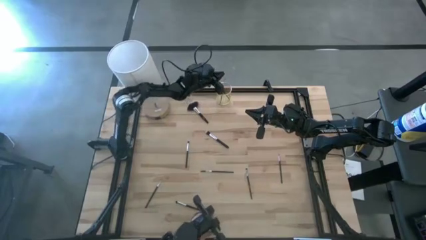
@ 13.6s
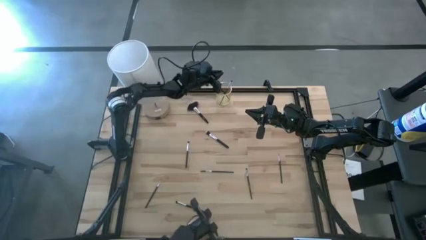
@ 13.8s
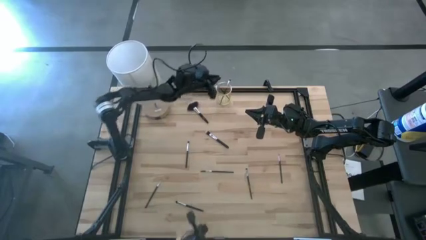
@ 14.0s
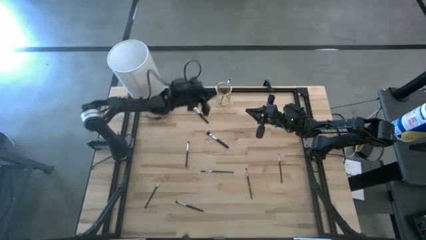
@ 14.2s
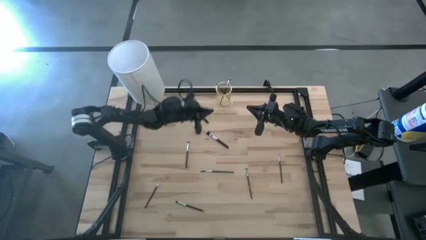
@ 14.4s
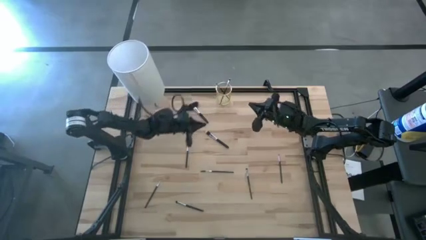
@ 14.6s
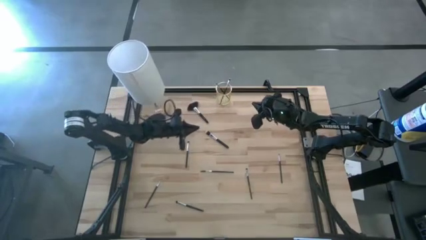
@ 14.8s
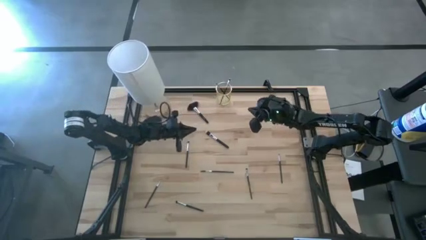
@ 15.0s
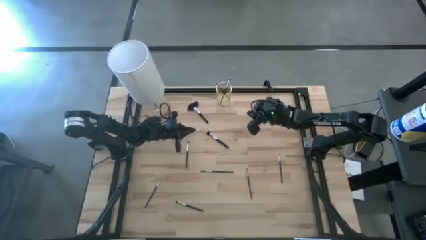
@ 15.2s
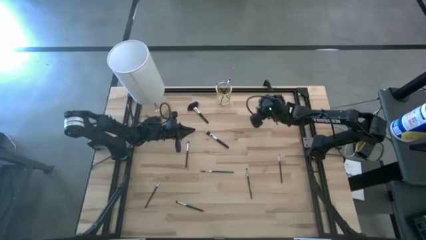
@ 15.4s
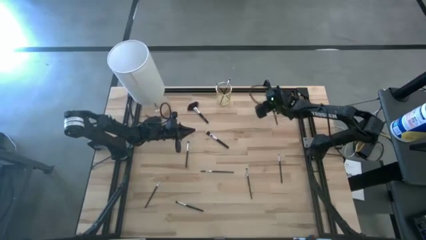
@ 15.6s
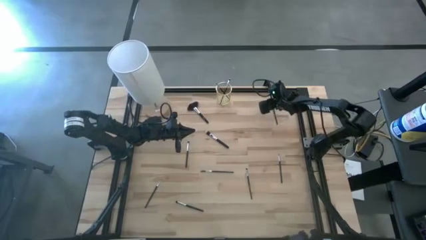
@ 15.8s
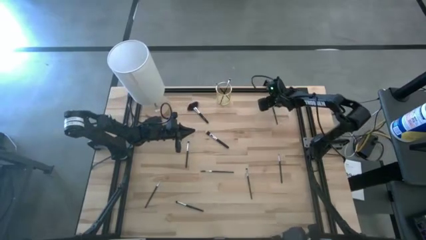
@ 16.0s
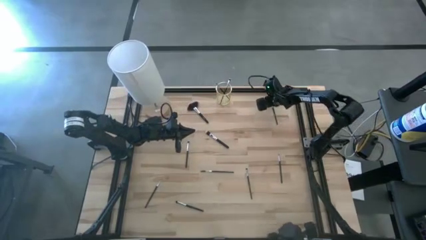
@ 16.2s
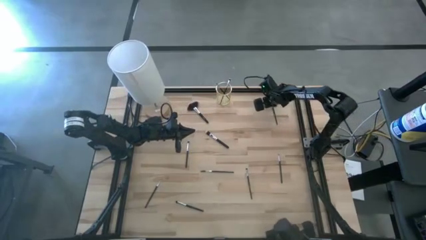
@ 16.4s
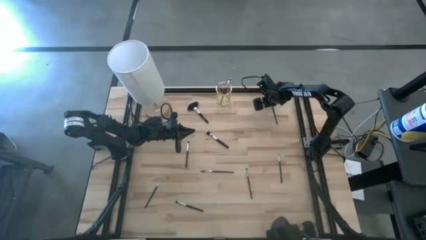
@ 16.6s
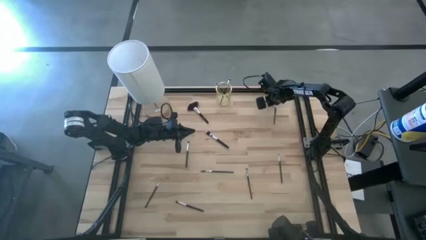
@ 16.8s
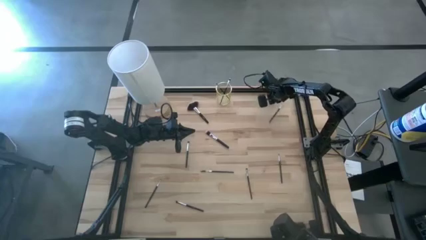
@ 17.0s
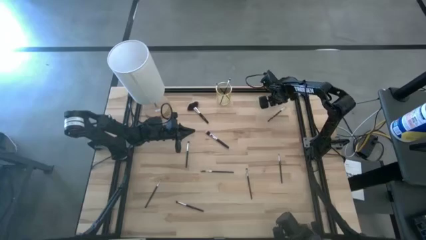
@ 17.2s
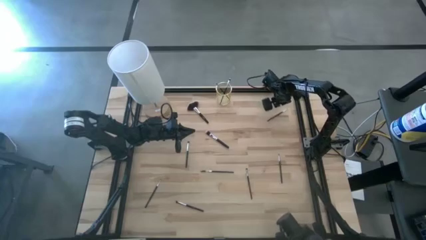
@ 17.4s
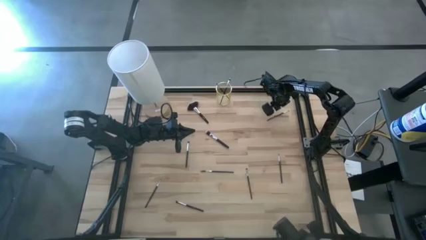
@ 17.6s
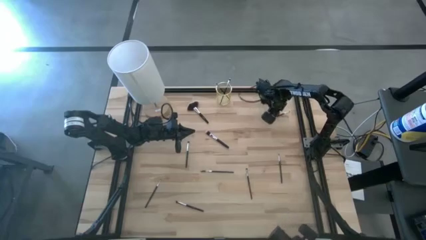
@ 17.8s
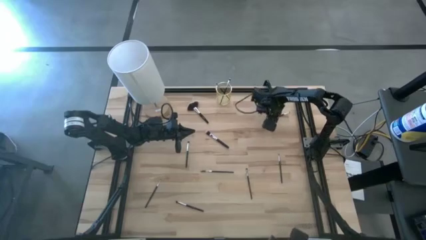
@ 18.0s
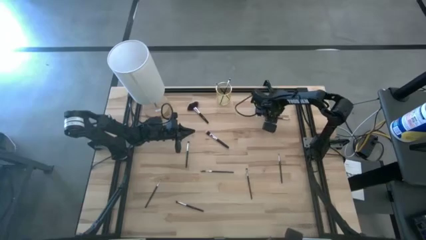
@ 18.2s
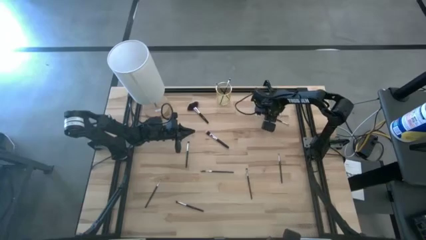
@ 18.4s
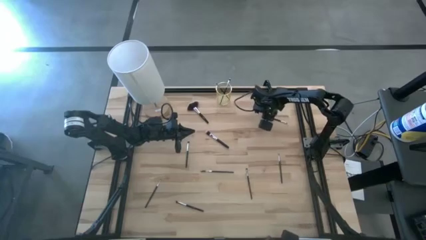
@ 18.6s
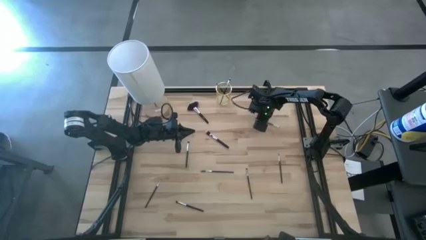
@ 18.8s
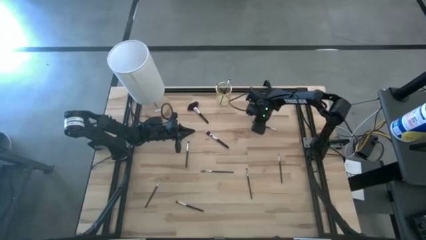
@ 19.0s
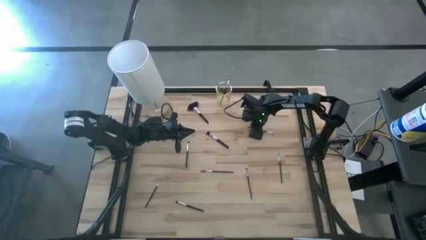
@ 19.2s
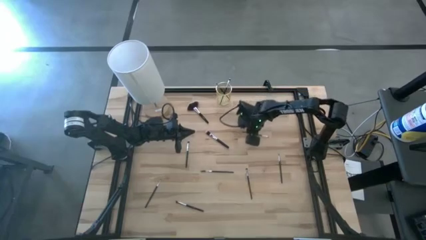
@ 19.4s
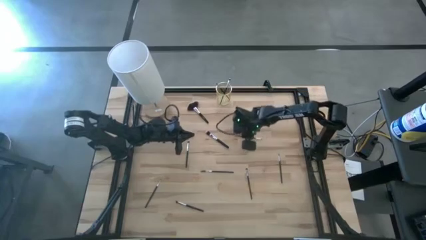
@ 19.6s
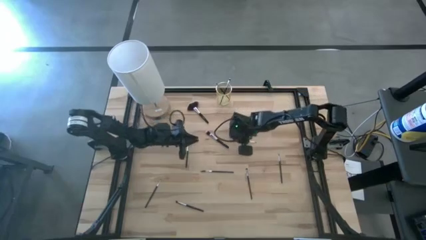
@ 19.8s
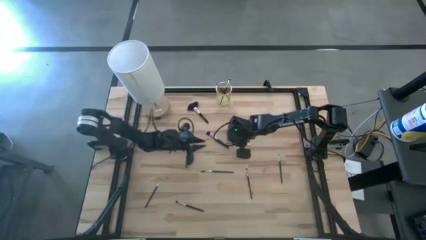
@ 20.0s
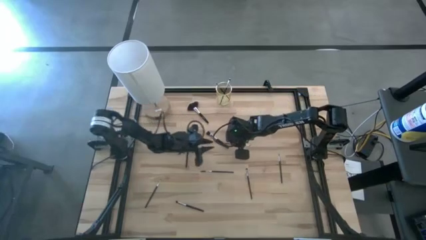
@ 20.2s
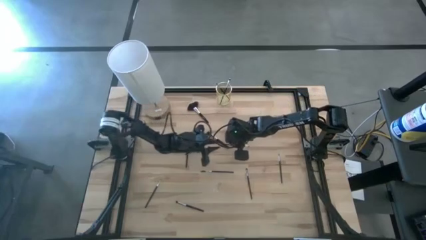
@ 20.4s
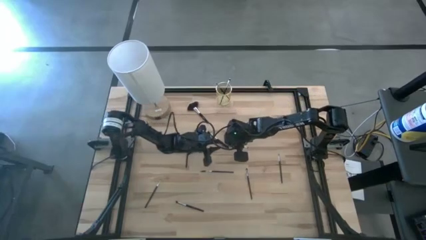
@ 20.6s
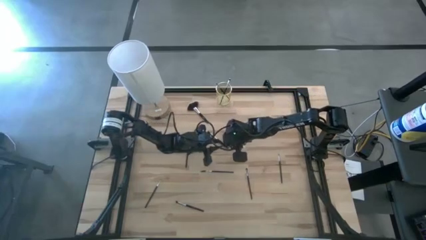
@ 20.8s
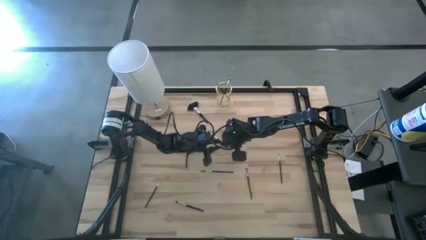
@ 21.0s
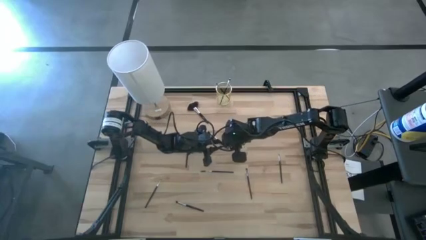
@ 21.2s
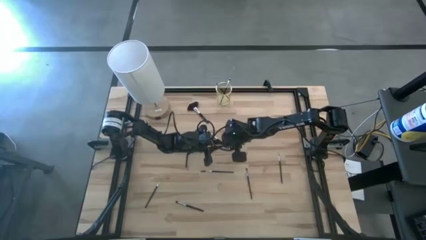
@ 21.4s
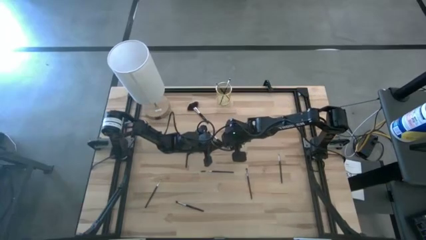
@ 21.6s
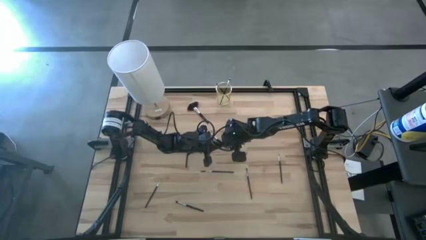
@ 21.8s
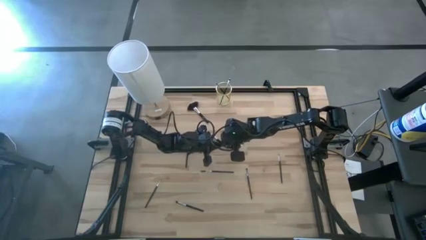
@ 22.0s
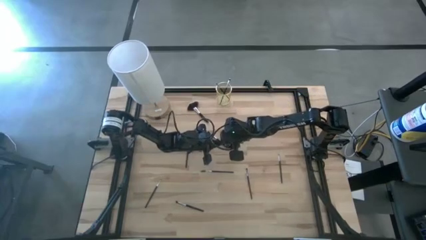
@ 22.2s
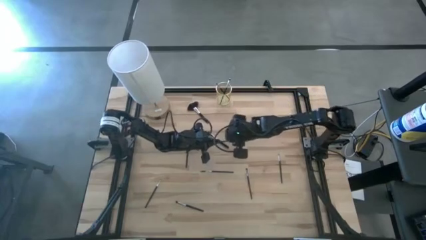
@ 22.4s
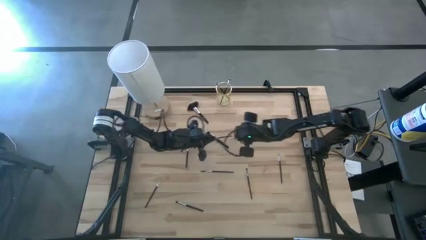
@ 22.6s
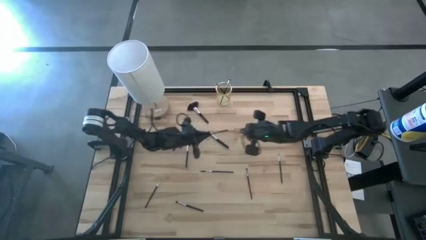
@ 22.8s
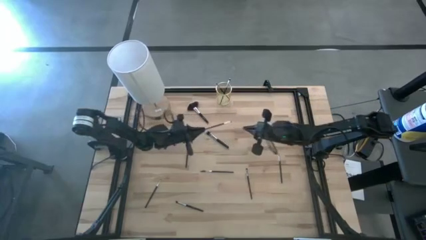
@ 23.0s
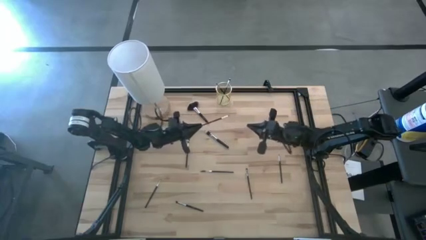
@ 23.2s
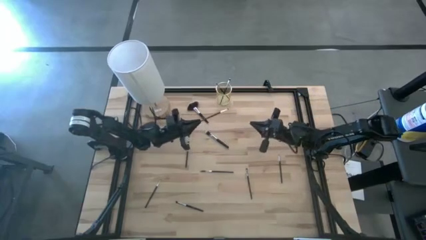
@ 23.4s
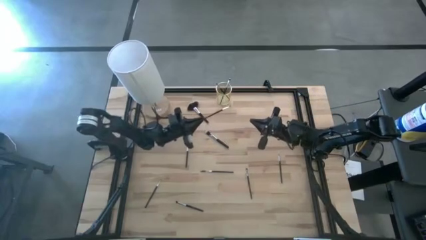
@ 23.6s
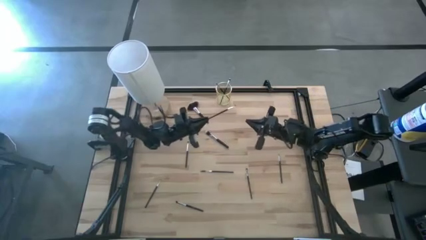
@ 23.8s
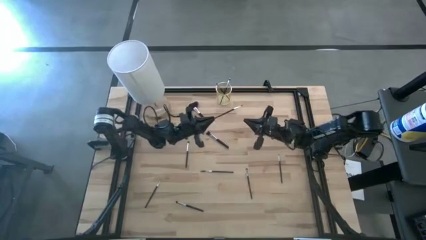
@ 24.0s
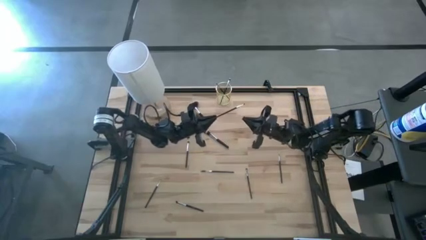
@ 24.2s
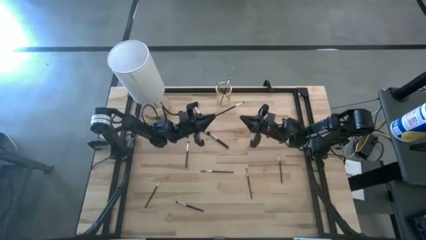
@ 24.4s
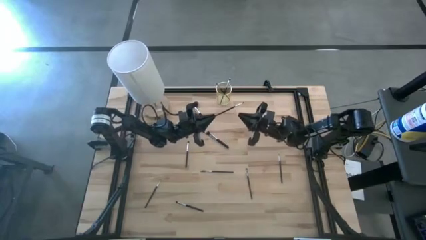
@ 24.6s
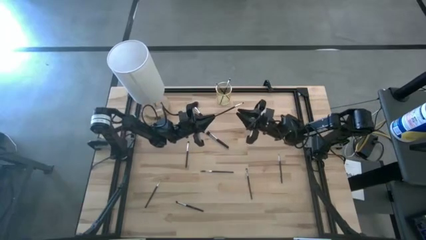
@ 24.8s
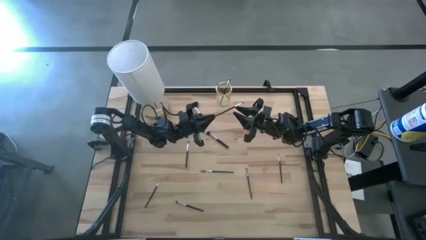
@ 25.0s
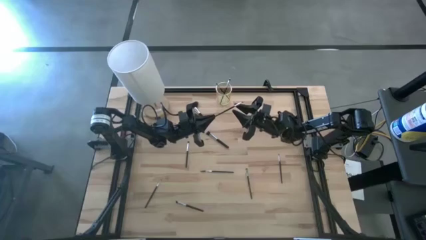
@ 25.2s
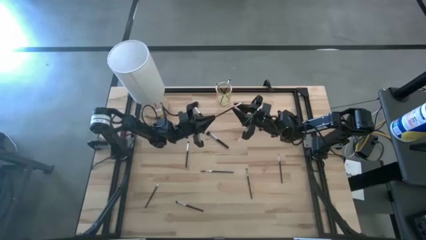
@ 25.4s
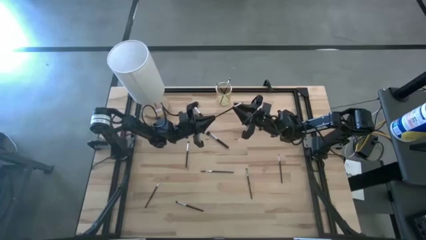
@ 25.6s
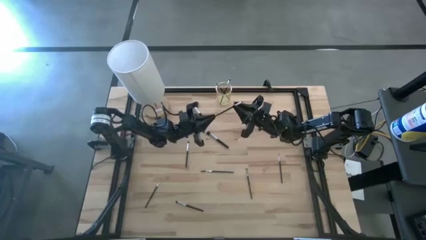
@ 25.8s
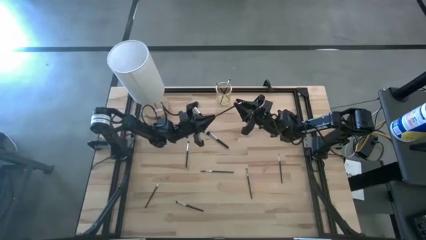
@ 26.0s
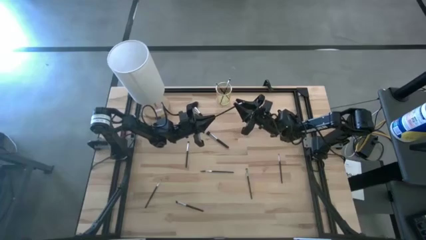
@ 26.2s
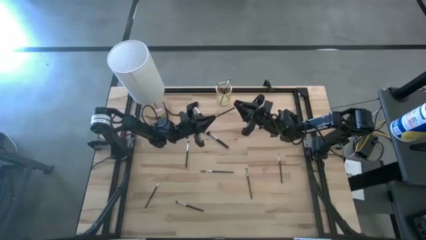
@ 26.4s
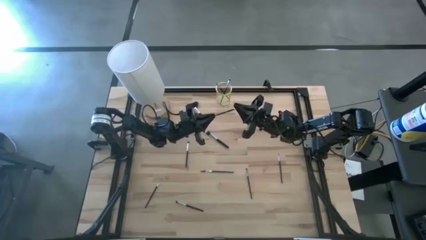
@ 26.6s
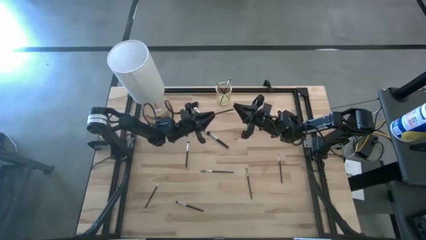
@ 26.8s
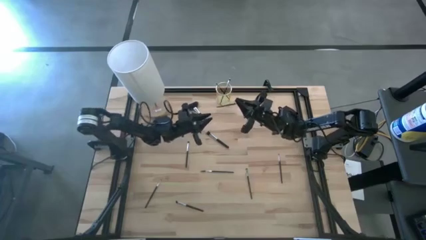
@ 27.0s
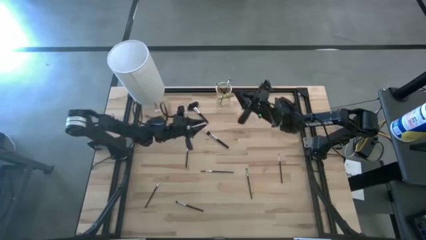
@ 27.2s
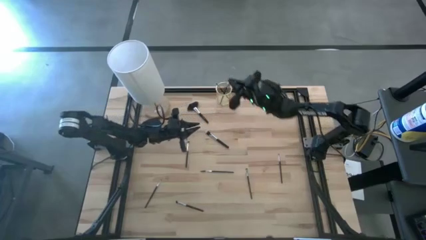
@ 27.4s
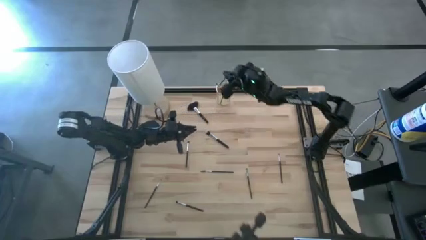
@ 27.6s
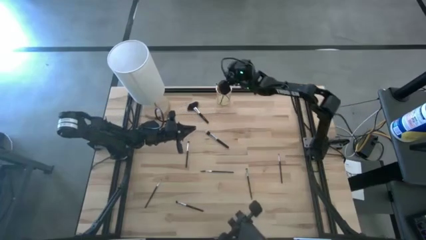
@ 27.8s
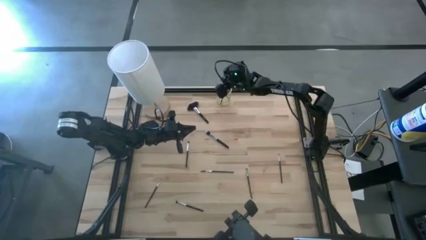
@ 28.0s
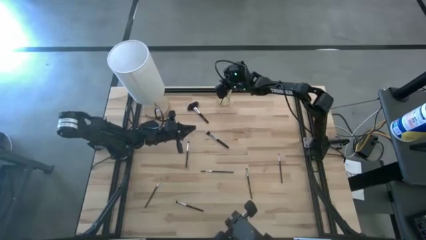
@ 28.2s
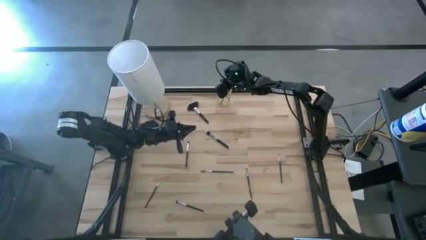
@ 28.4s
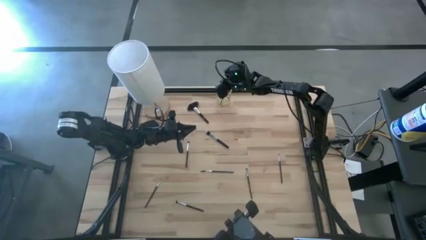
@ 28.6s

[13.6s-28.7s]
Task: Put items in baskets/containers
Put the eyeshadow make-up brush into the gold container

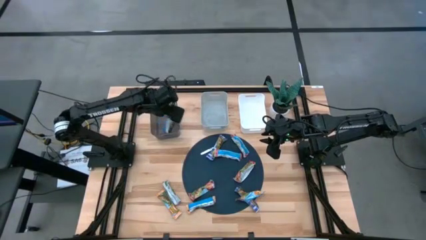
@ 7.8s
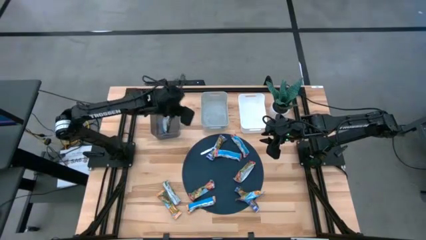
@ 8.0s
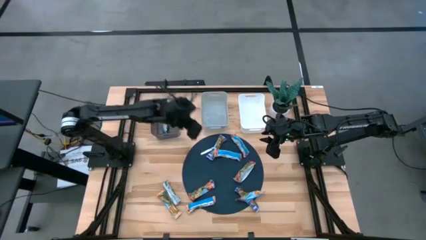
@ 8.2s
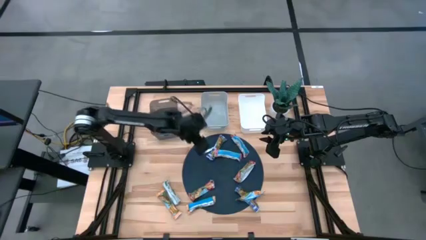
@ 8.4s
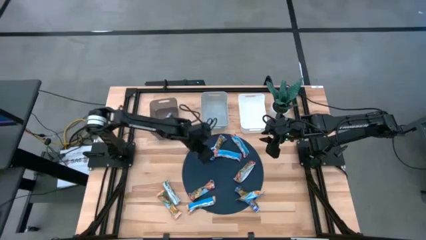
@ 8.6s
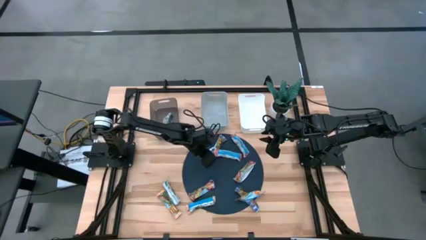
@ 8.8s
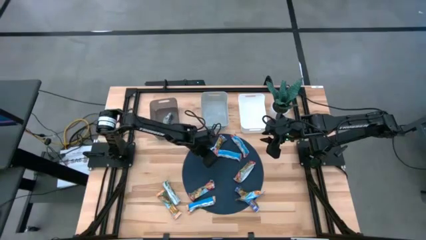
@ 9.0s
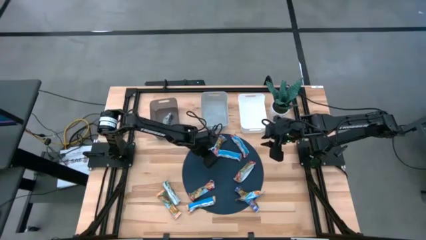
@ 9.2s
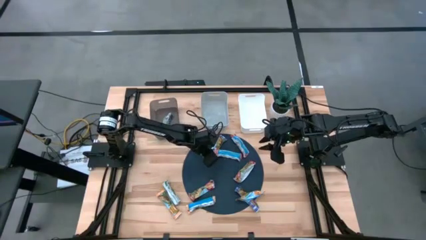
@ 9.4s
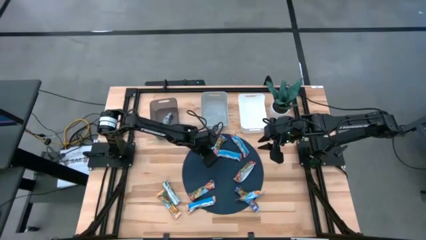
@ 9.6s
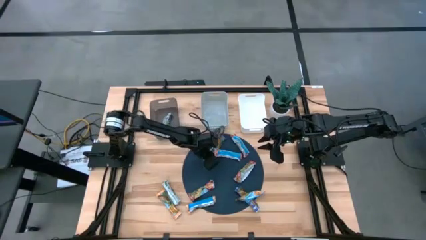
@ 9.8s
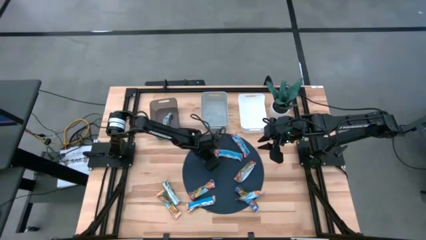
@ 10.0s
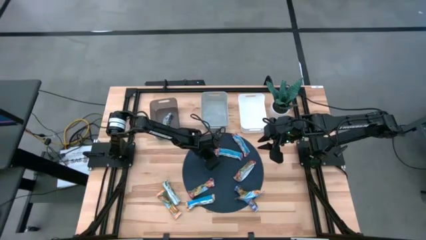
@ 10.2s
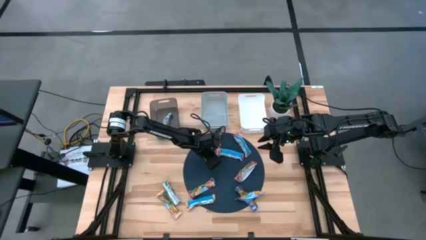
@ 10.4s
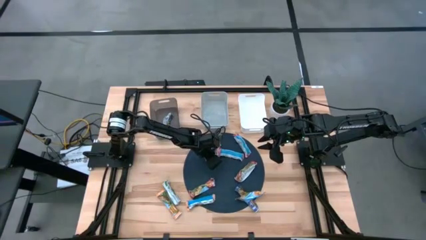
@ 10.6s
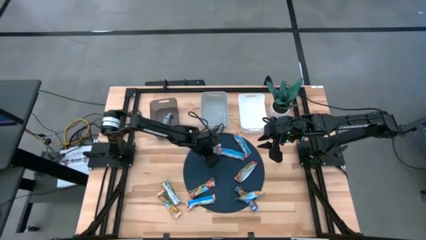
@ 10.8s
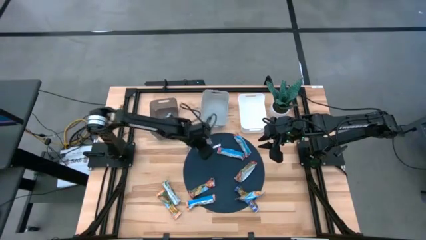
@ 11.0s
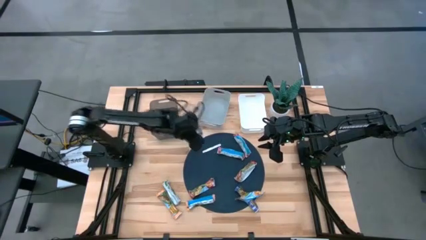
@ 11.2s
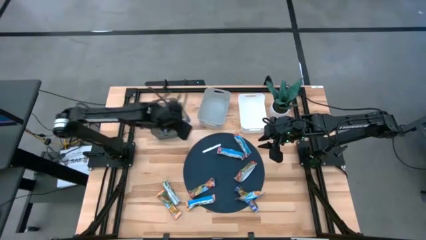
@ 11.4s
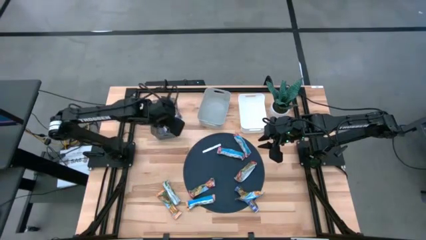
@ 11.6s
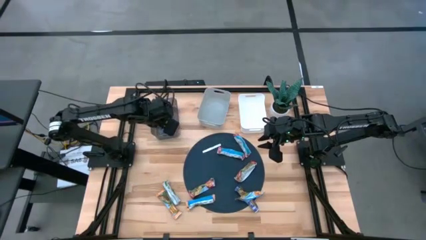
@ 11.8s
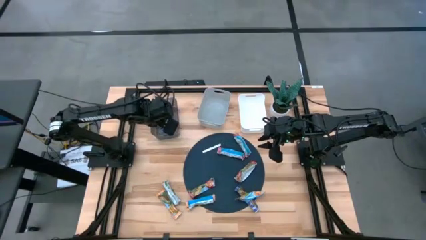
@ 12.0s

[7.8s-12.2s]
Task: Pick and place Granola Bars by type
Put the blue granola bar into the black bin
